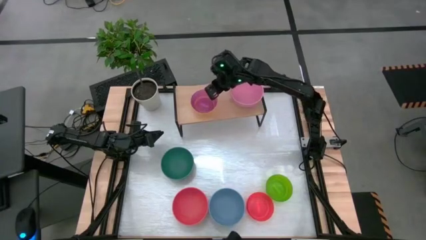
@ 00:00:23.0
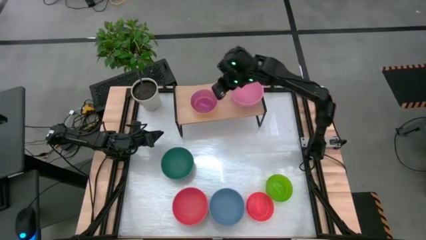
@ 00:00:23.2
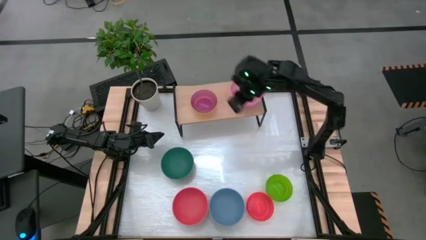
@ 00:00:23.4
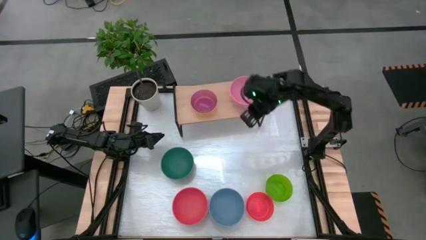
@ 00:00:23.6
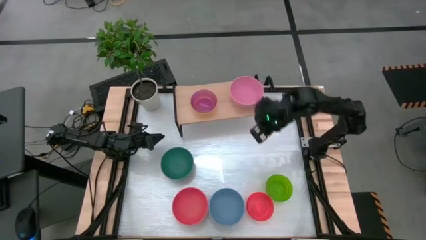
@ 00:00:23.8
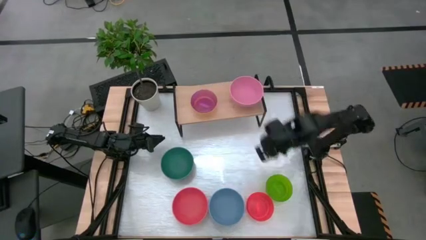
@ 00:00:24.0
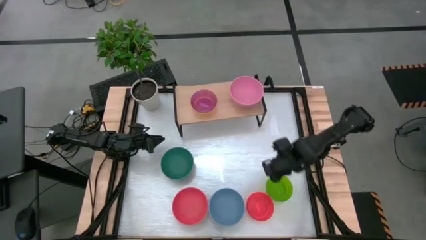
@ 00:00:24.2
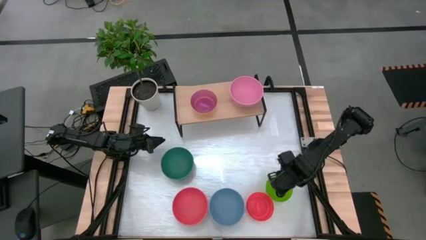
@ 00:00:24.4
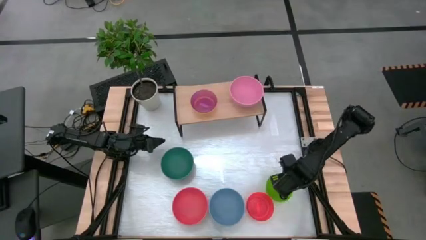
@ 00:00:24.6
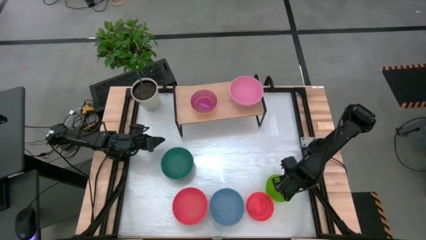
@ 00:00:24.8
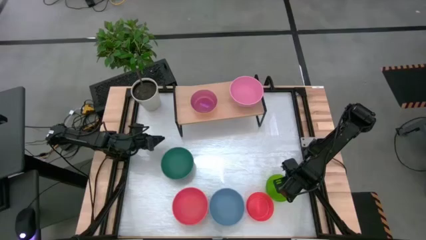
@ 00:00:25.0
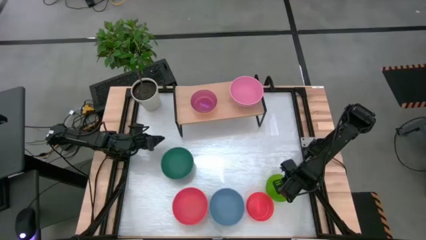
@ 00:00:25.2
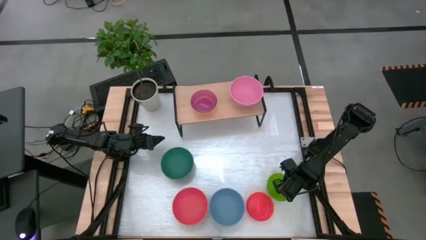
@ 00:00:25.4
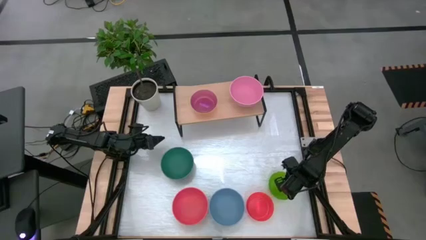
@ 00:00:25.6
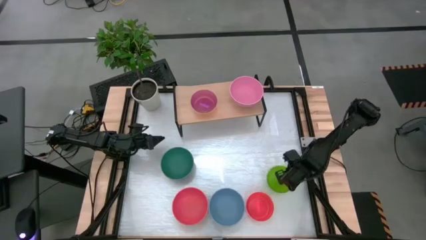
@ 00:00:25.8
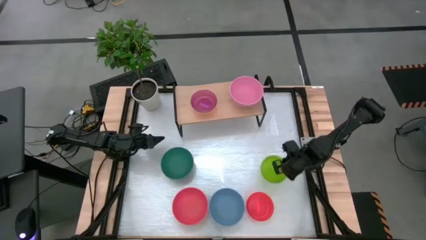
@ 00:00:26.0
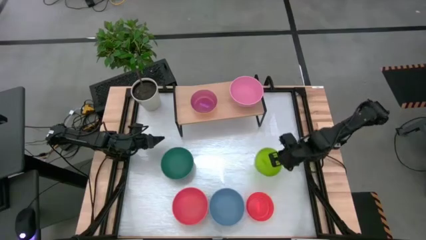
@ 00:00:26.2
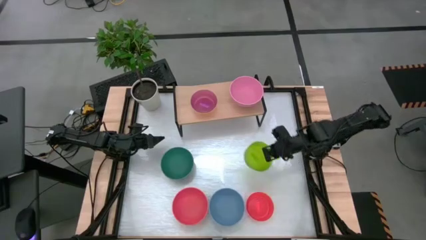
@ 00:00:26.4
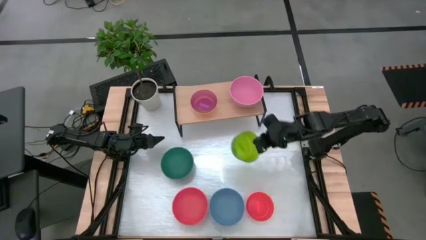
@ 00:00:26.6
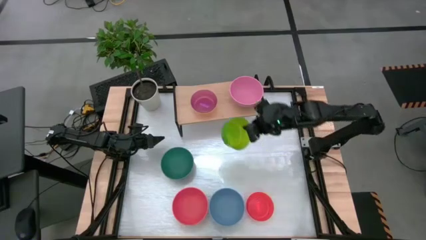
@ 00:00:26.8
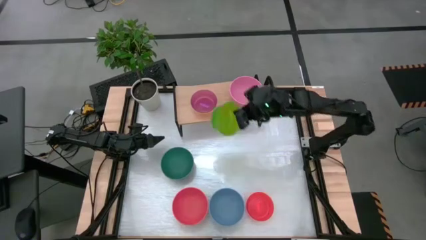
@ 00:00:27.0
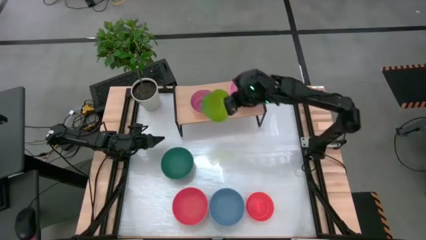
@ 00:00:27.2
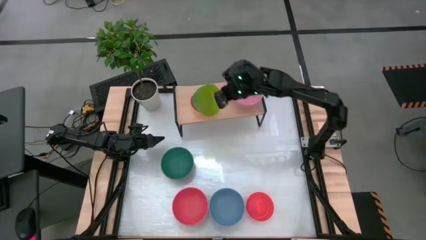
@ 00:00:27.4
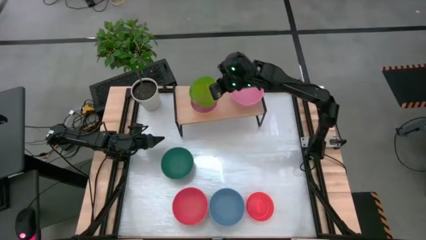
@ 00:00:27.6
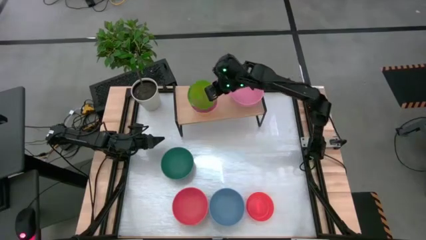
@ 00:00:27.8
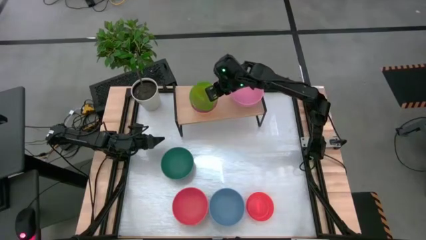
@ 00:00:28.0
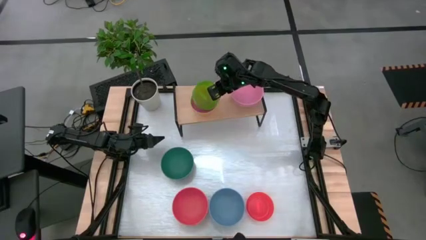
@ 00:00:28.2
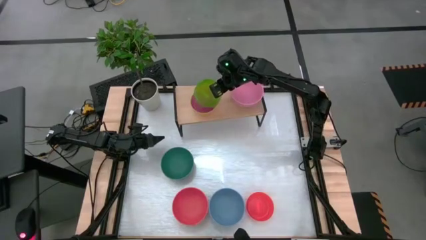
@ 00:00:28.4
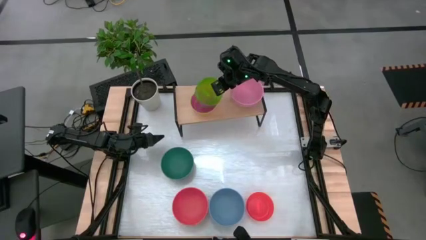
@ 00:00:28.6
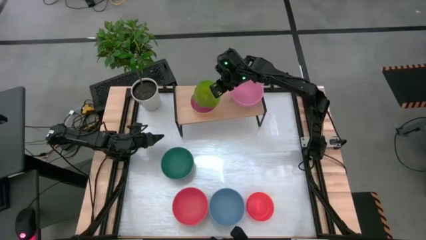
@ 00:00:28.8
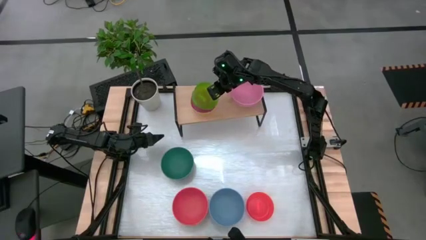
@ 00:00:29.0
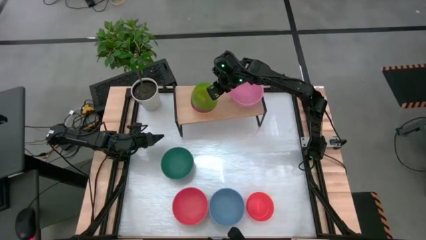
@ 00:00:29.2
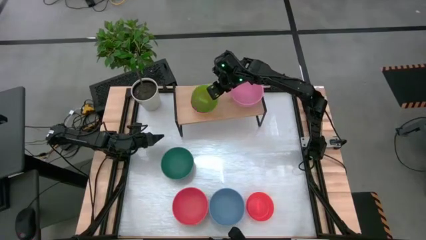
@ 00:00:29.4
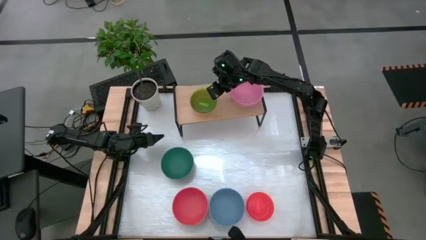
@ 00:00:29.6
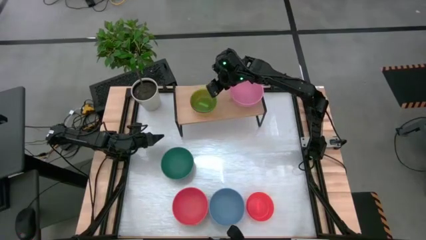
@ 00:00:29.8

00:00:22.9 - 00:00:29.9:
Task: Place and stack bowls onto a shelf
Stack the green bowl on top of the violet bowl on the shelf

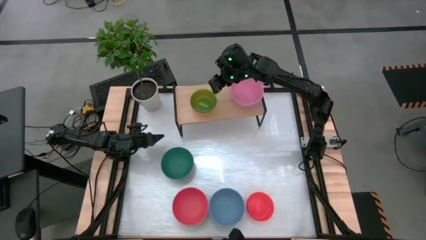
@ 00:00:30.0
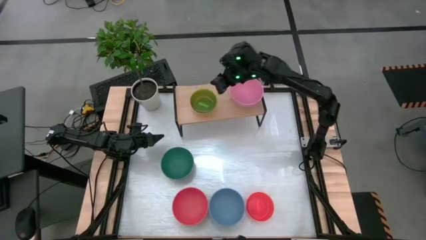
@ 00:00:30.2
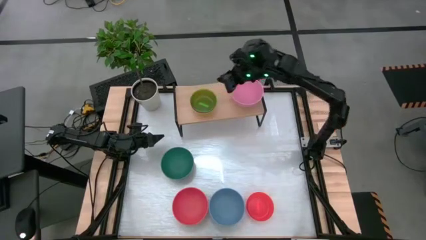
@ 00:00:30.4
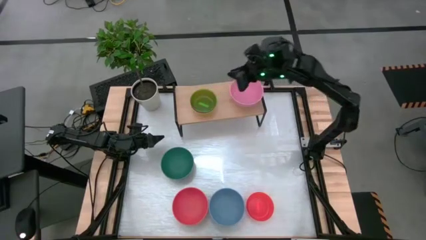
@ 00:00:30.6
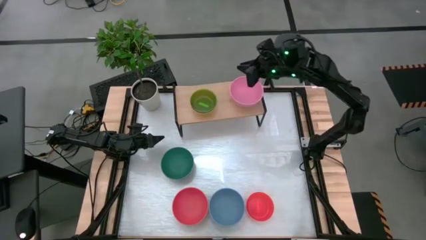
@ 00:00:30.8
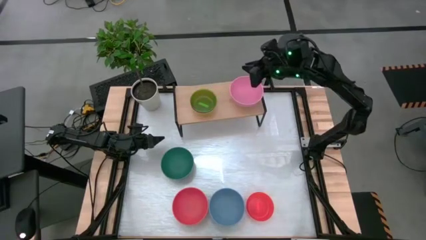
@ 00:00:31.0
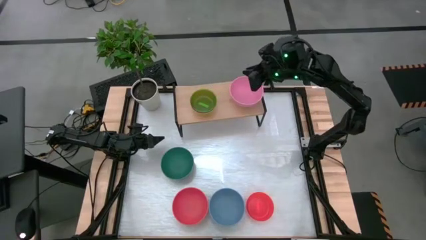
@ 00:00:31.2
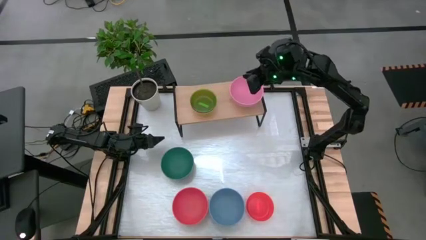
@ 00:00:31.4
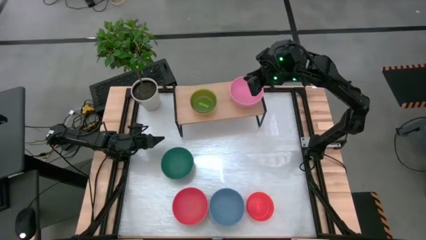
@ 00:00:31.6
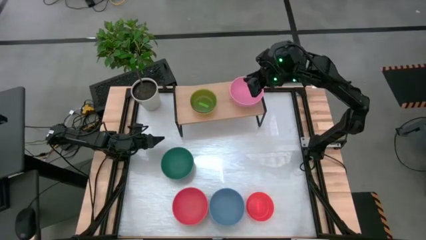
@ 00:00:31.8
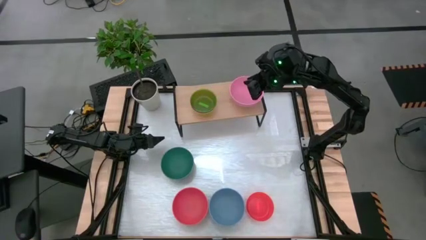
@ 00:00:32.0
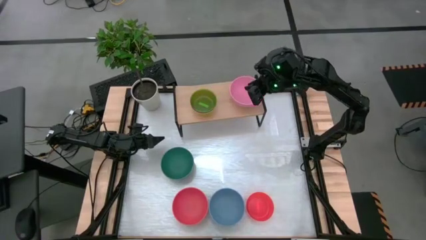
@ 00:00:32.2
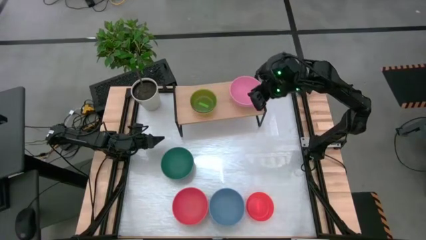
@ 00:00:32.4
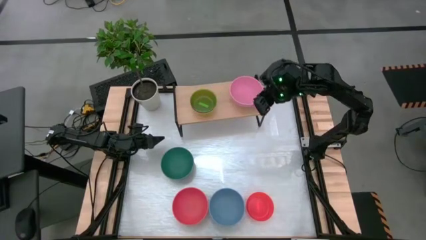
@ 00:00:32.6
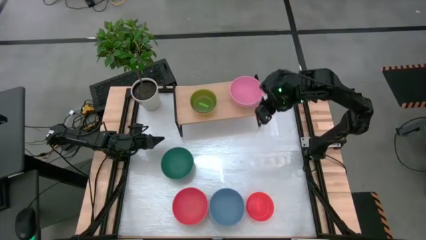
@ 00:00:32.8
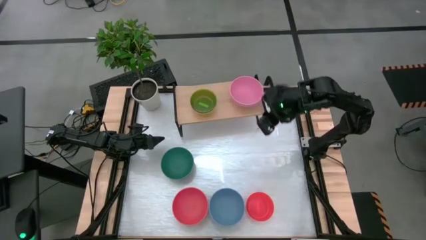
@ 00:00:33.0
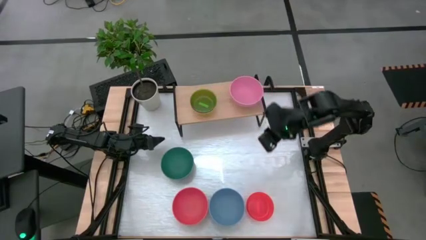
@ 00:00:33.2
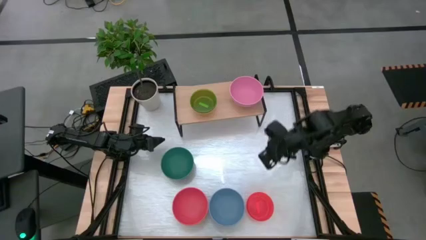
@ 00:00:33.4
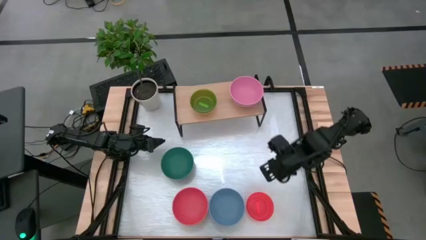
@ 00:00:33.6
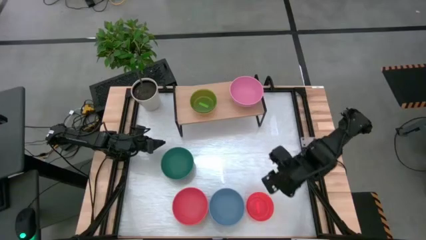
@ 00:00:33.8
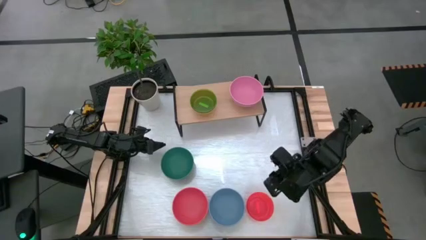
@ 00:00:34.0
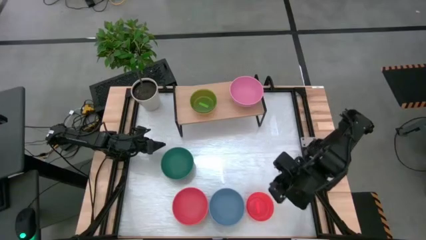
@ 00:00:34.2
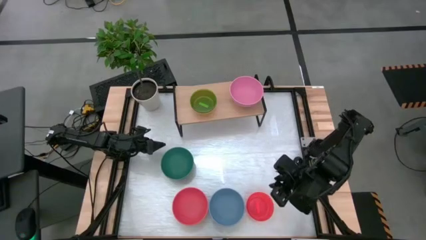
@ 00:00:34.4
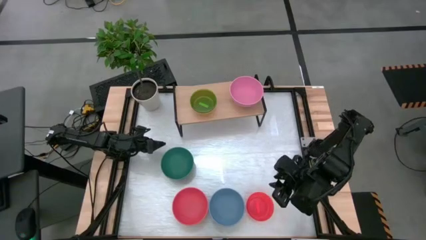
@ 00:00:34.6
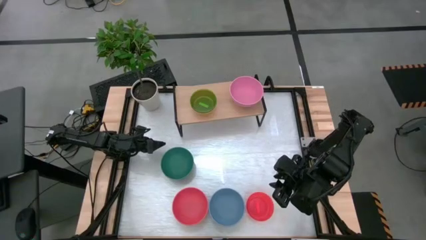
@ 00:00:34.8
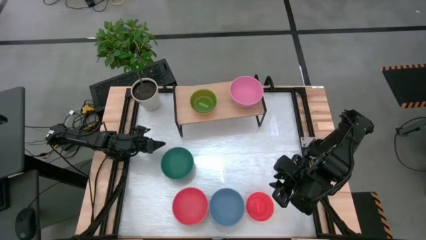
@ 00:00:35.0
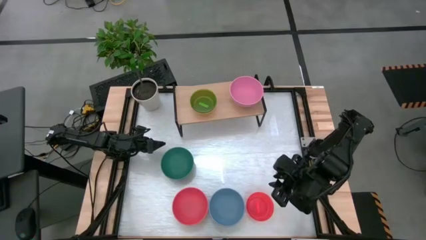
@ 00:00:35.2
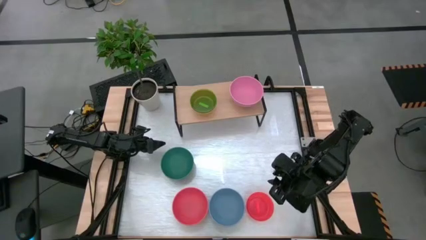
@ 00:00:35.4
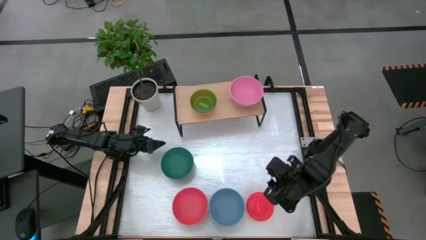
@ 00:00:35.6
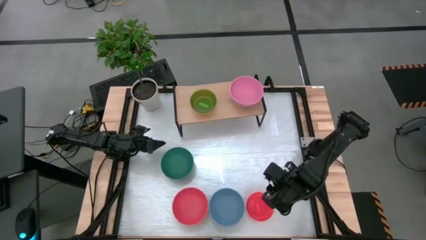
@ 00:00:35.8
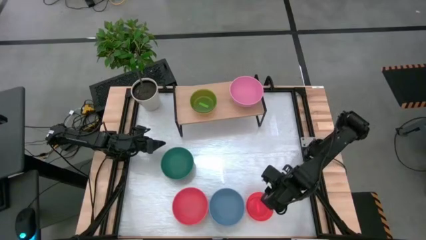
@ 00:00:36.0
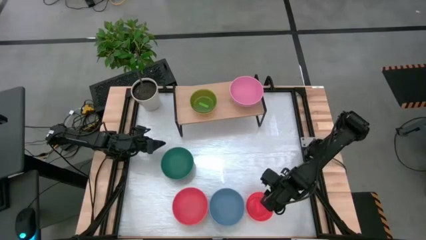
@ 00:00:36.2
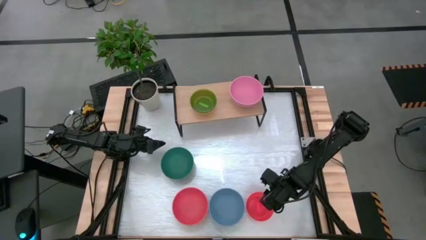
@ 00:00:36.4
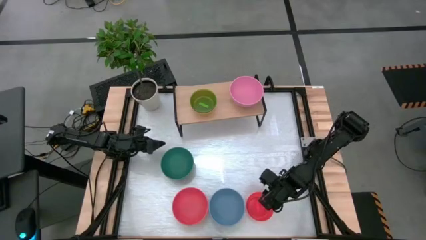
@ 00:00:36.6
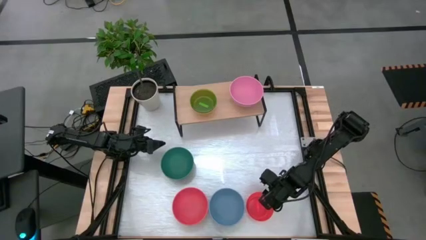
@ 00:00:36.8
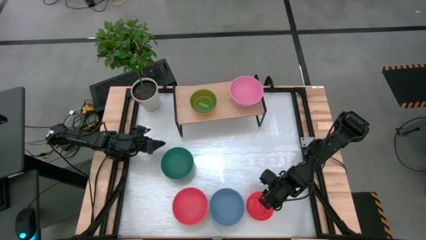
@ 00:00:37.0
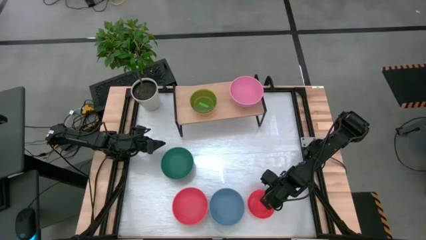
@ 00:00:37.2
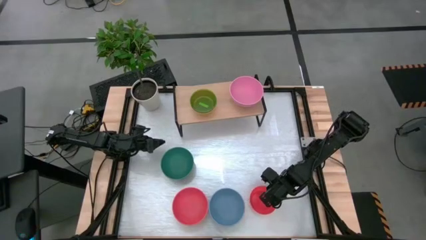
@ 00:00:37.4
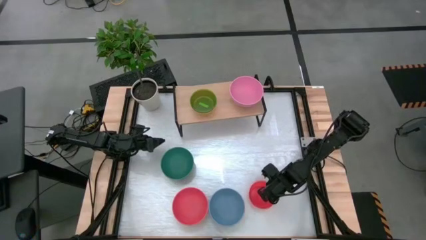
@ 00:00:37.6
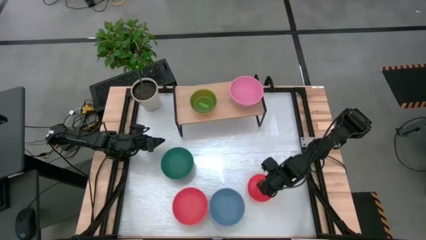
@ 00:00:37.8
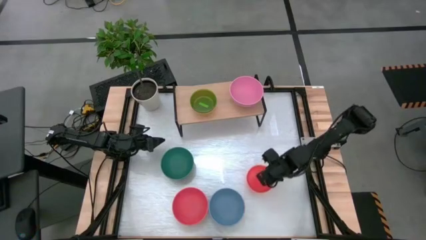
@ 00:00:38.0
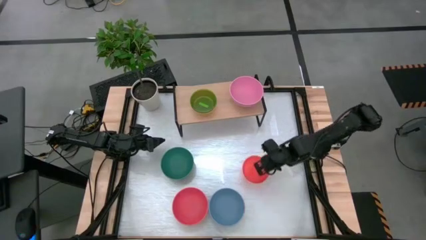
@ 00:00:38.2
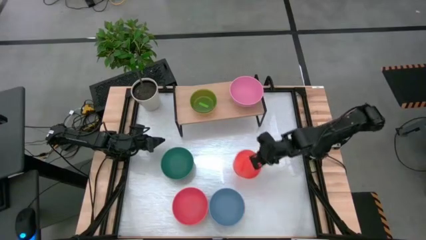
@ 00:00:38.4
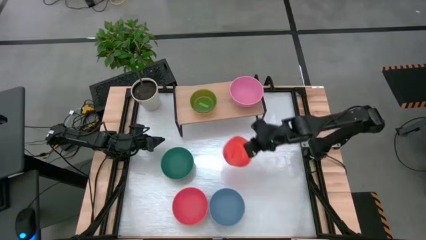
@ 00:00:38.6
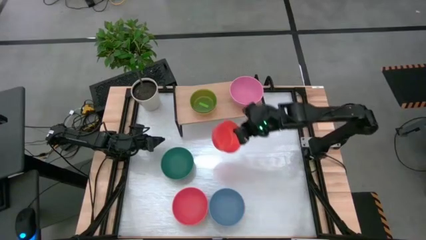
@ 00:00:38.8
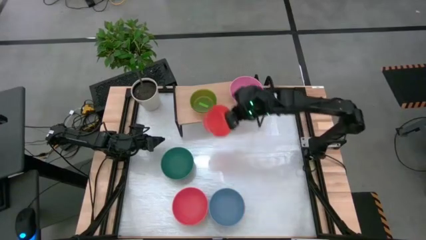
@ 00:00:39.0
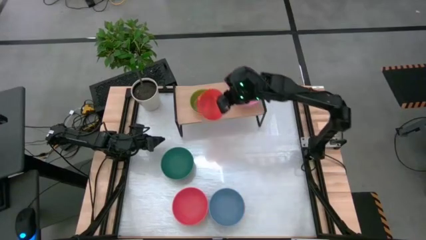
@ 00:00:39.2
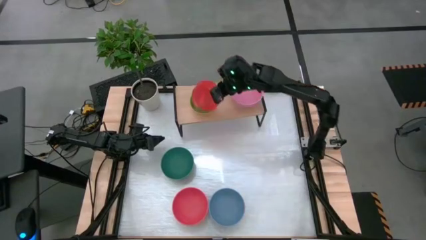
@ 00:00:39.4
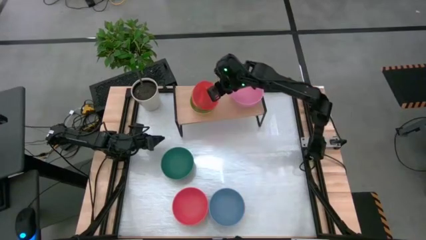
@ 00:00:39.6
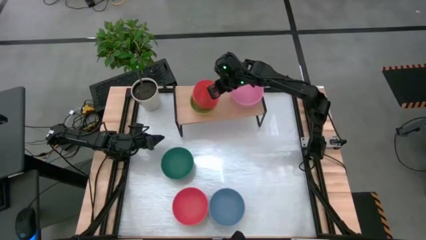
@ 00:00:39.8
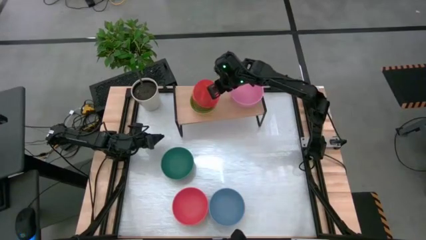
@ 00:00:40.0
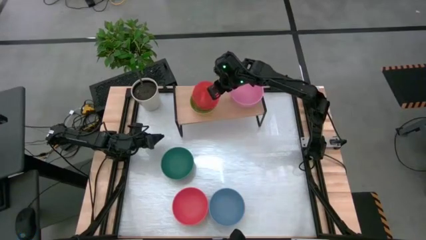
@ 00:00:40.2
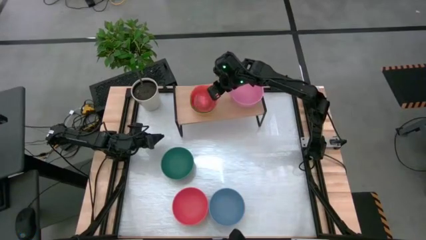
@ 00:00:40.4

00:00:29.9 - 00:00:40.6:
Stack the orange bowl on top of the green bowl on the shelf
